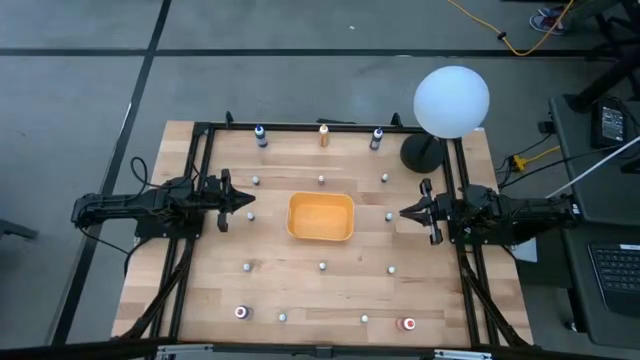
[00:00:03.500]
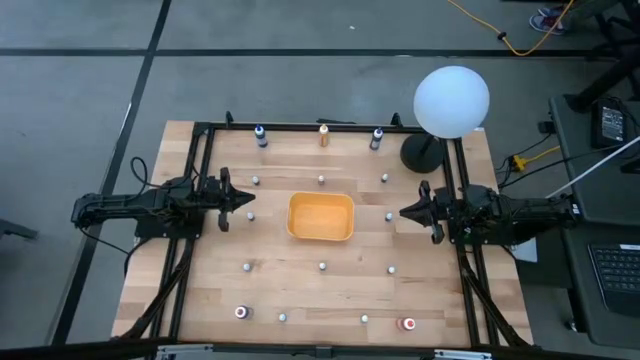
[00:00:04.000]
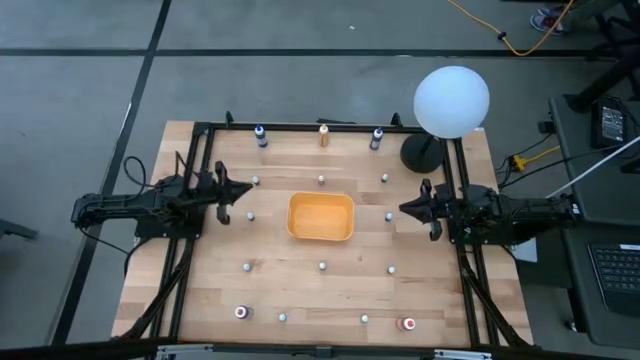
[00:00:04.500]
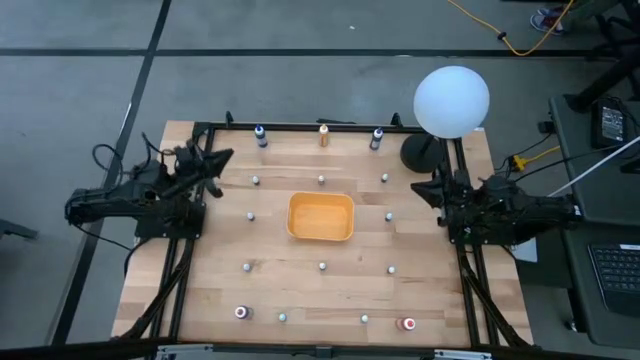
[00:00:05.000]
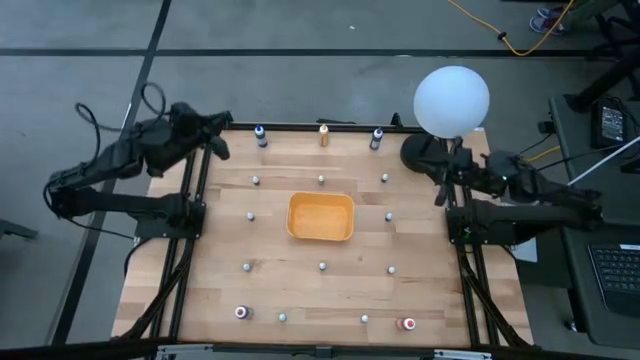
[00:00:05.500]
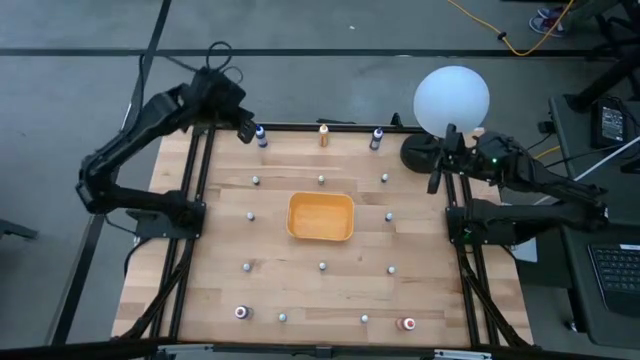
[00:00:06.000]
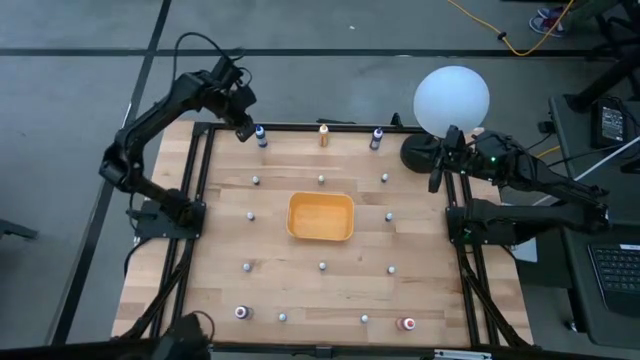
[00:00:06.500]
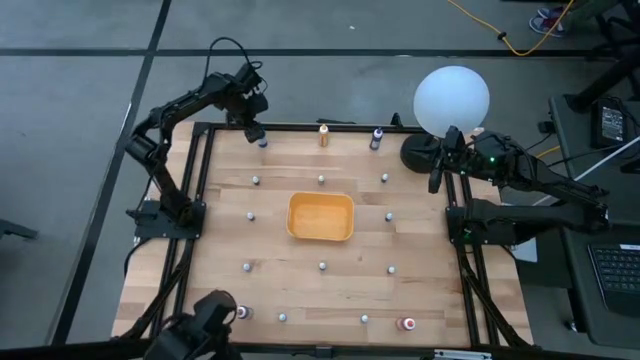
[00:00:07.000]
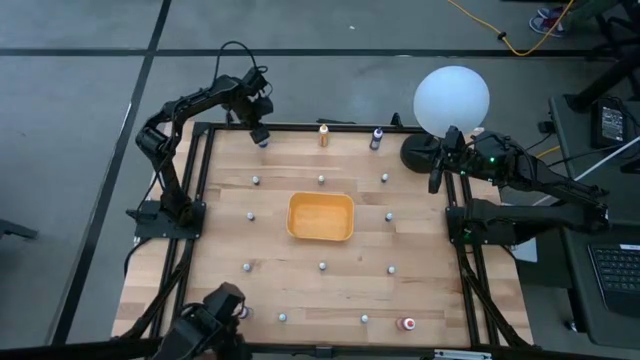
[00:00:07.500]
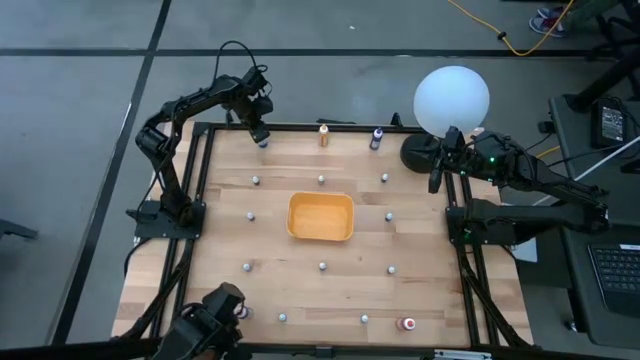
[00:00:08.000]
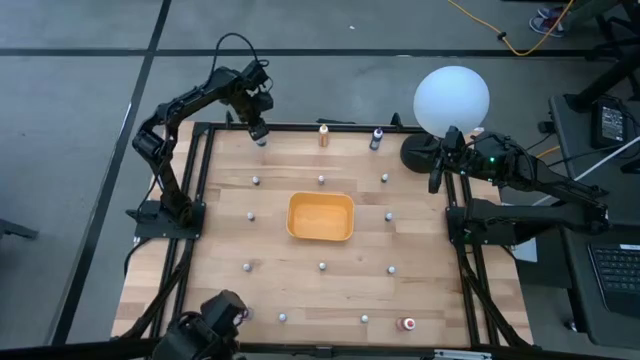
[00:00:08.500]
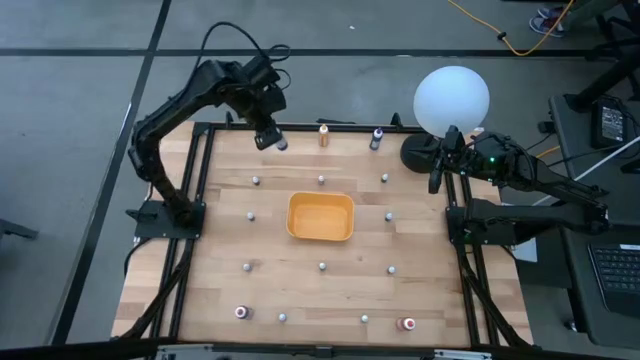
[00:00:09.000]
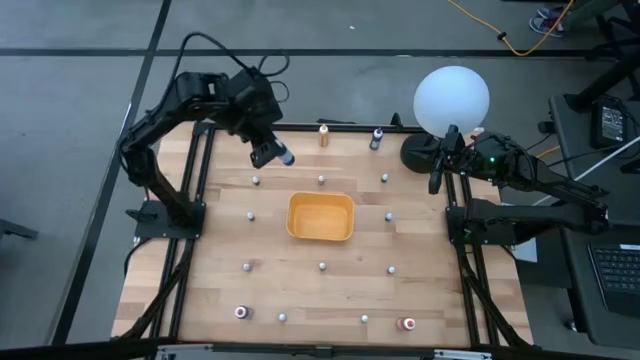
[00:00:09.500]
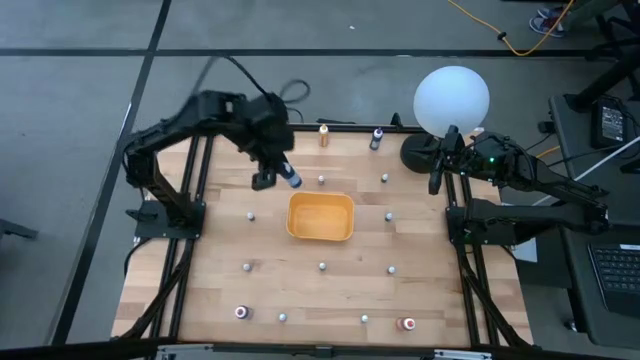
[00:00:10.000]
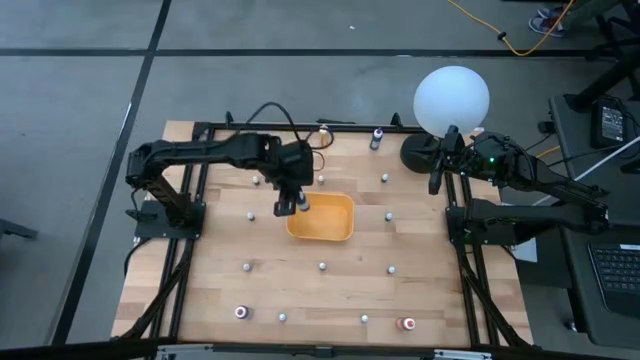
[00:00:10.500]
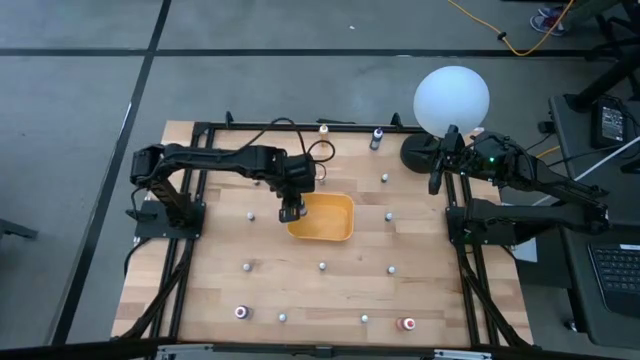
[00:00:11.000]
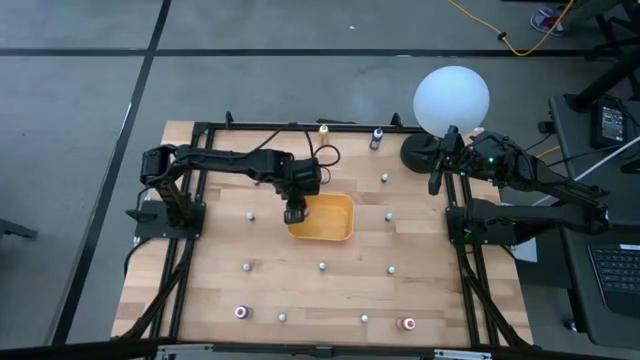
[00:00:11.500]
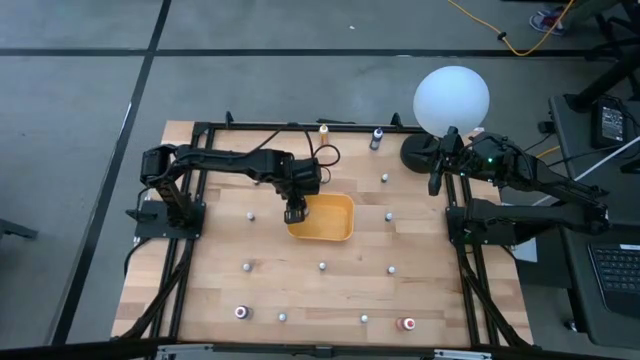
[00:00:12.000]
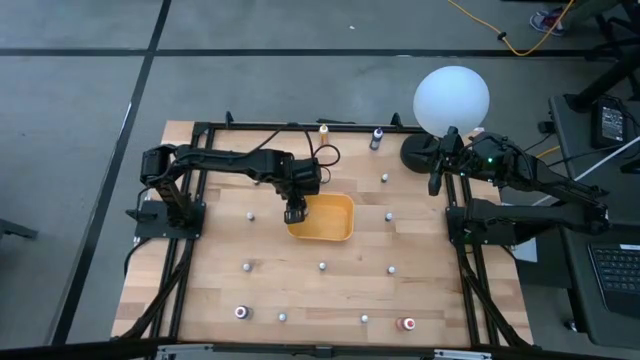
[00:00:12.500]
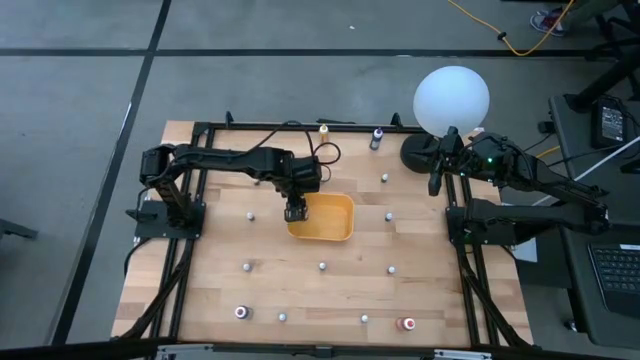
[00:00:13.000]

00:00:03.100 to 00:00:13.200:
Task: Pick & Place food coloring
Put the blue food coloring bottle into the yellow bin

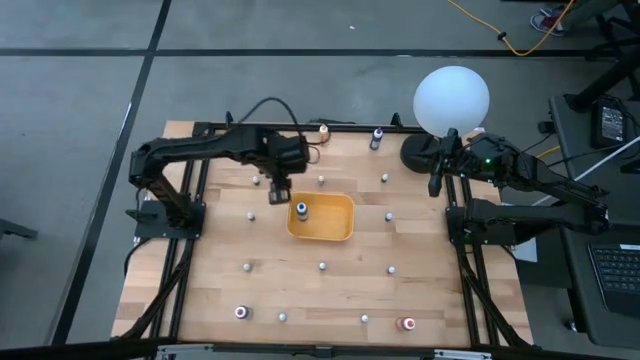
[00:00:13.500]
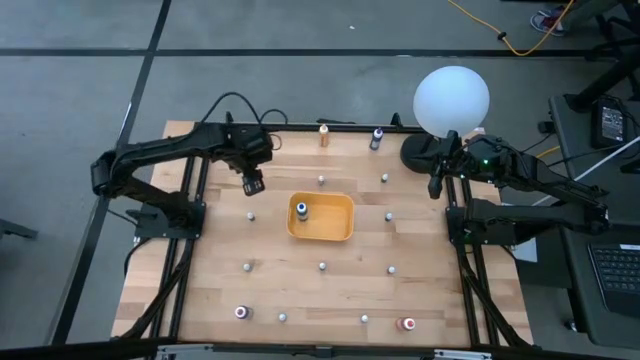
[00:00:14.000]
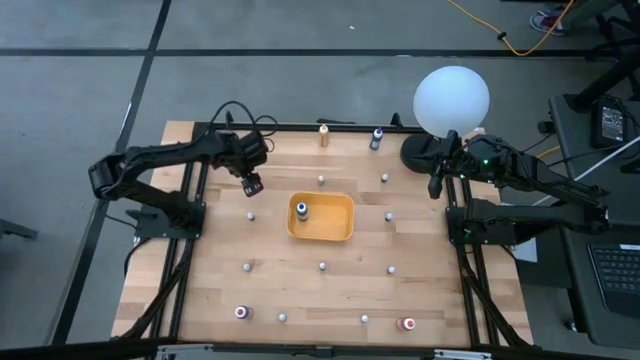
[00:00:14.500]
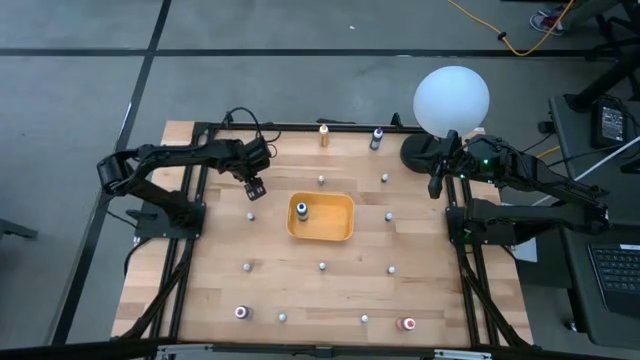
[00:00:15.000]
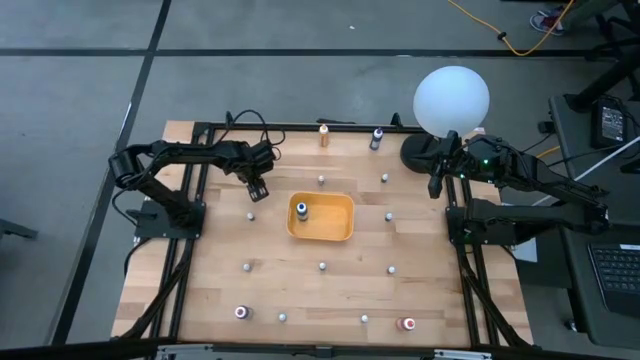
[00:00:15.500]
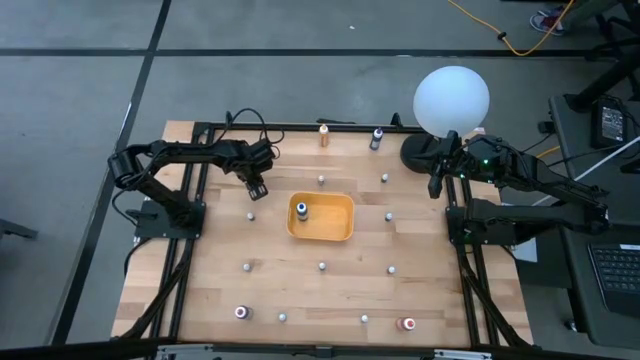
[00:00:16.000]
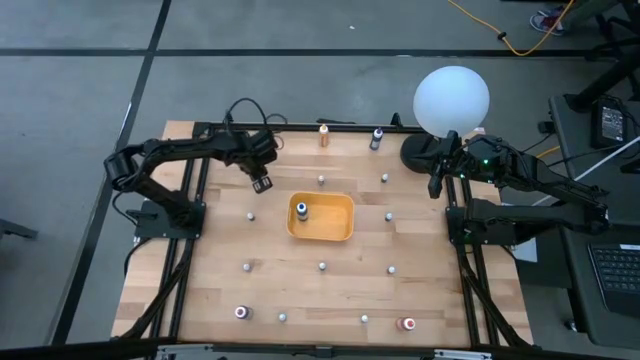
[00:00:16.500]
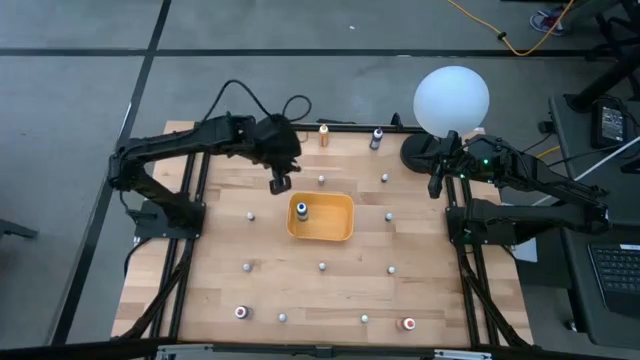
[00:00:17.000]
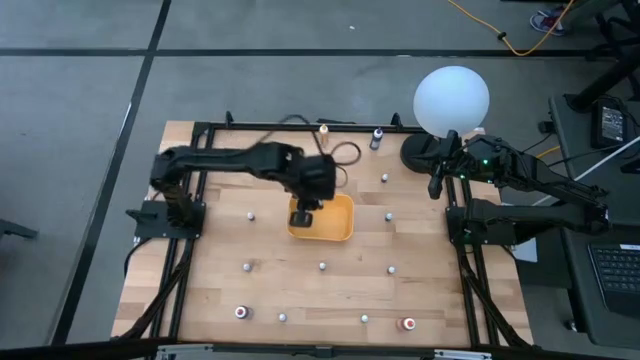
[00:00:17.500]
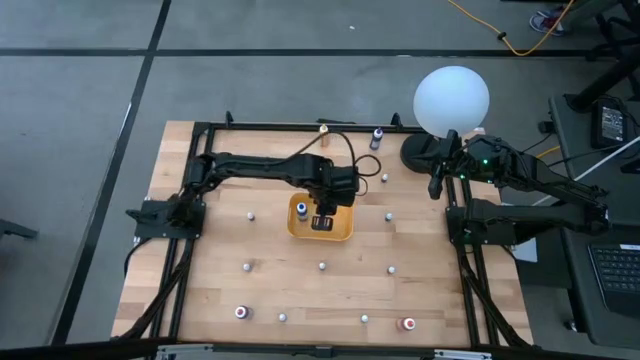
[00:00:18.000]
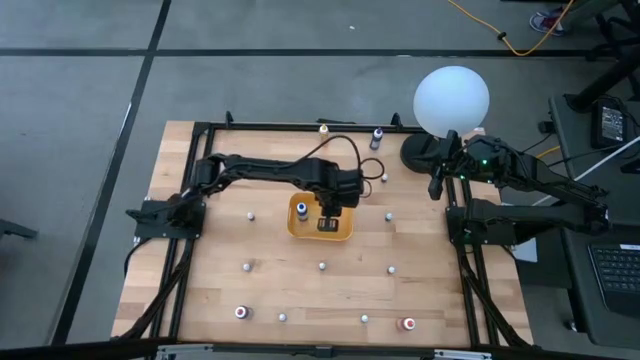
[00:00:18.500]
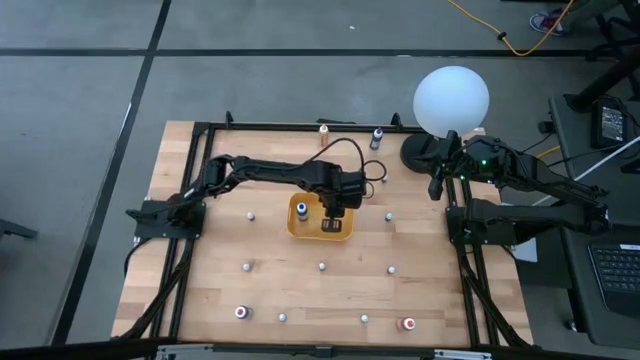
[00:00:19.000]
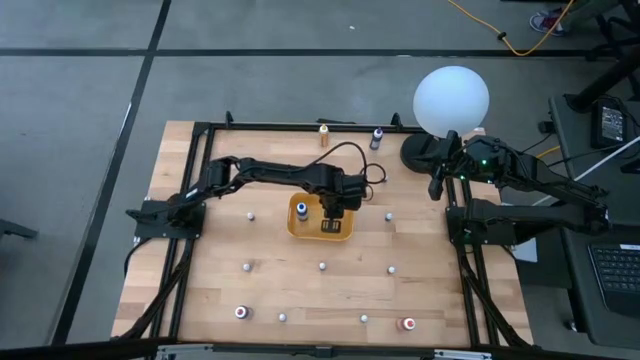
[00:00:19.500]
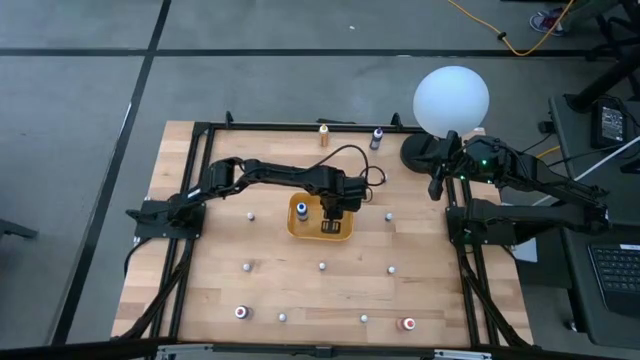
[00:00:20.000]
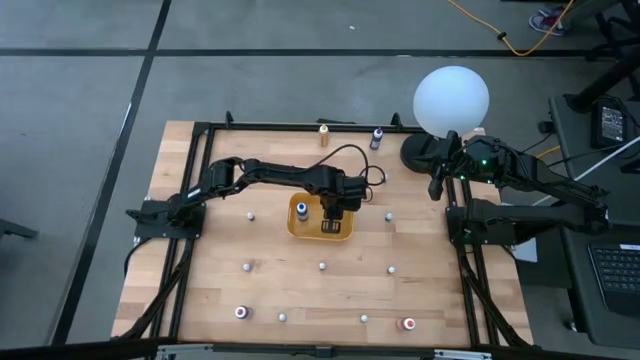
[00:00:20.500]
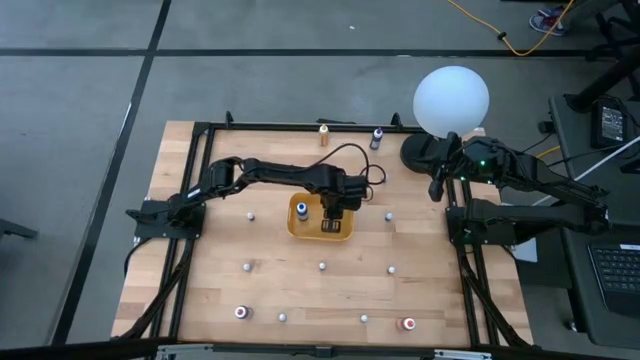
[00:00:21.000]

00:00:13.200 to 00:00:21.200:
Put the green food coloring bottle into the yellow bin

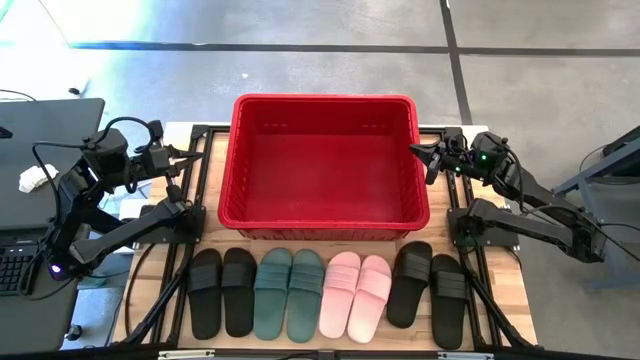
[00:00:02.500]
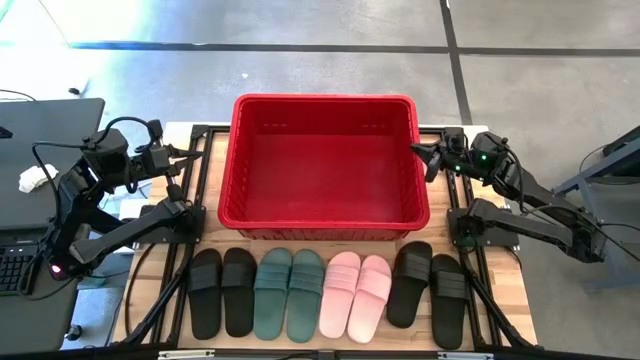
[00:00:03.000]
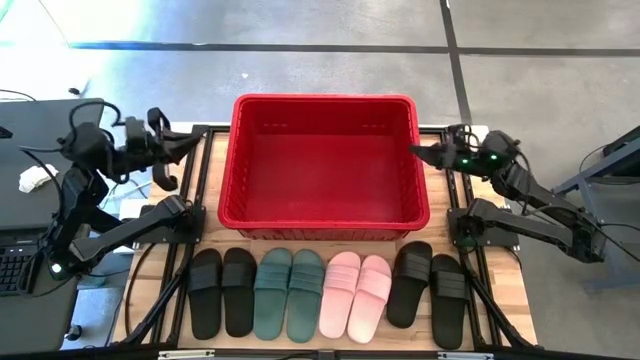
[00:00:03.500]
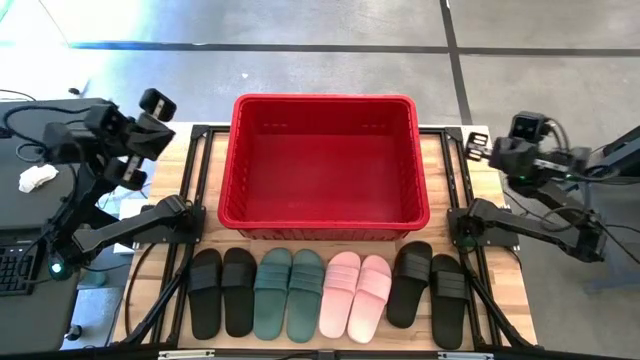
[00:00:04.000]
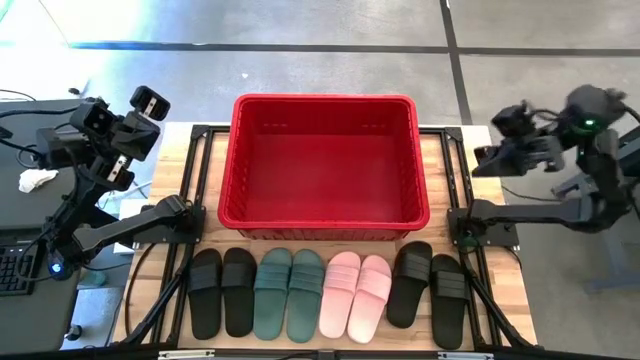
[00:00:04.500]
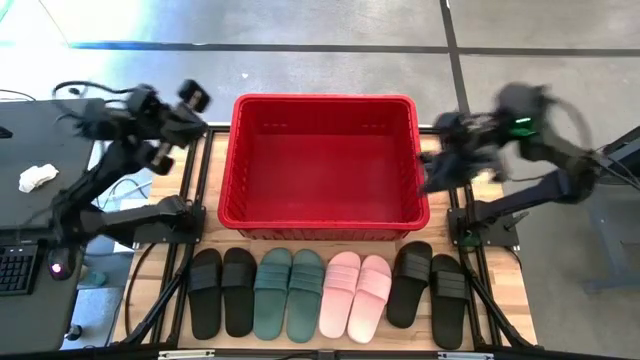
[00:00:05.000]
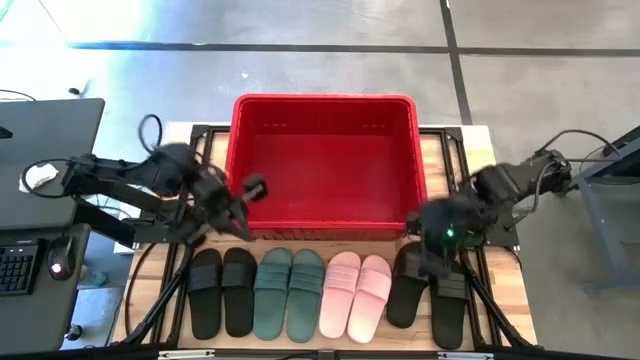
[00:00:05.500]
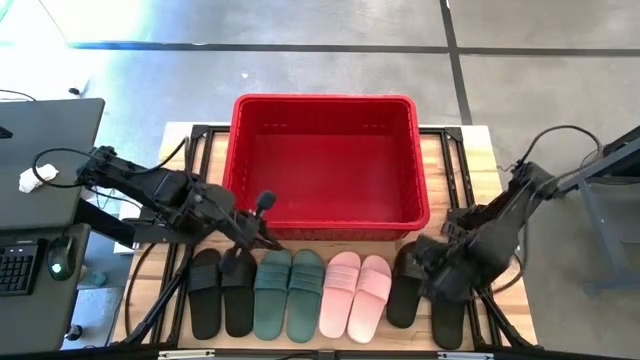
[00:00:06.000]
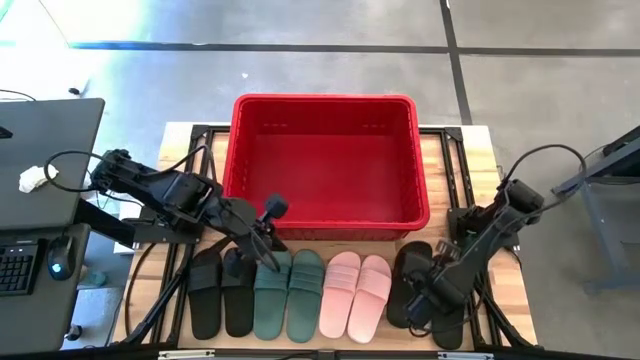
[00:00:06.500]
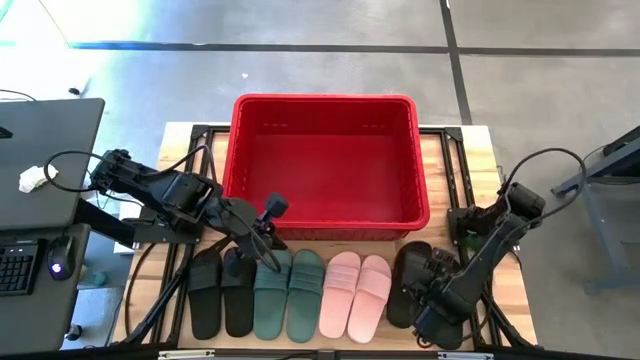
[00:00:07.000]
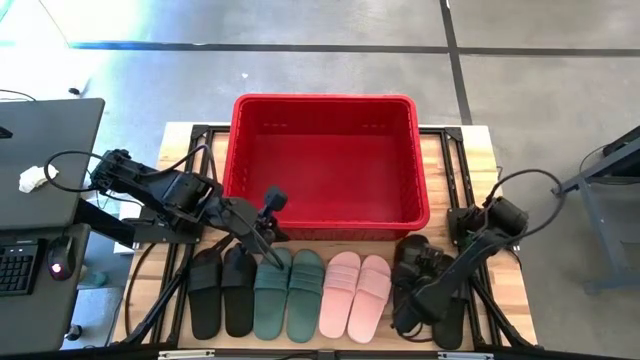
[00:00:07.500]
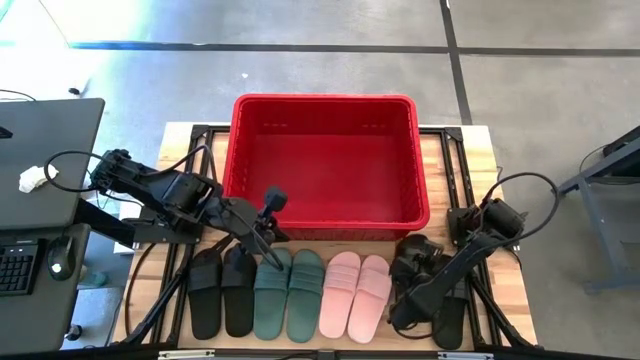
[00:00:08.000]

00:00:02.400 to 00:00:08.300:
Task: Pick and place slides into bin
Put the black slide into the red bin
